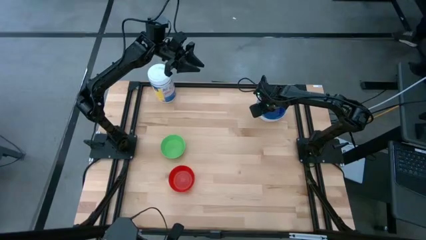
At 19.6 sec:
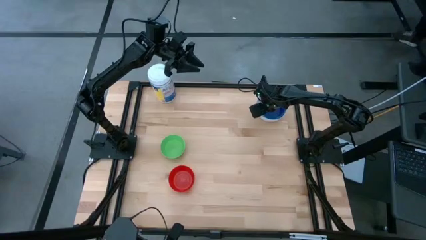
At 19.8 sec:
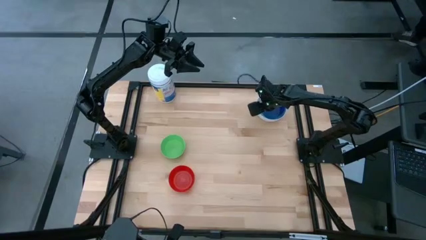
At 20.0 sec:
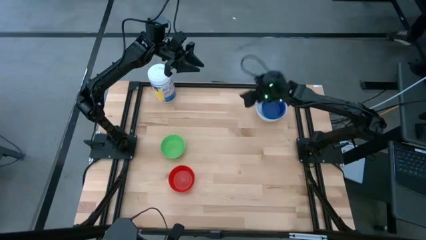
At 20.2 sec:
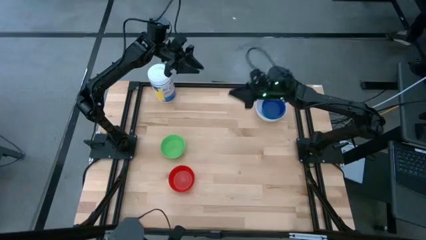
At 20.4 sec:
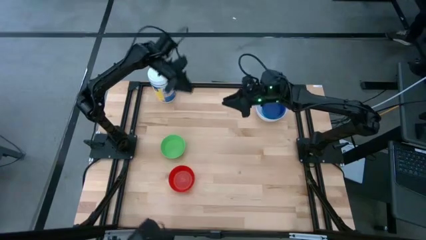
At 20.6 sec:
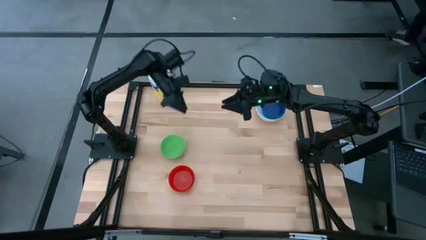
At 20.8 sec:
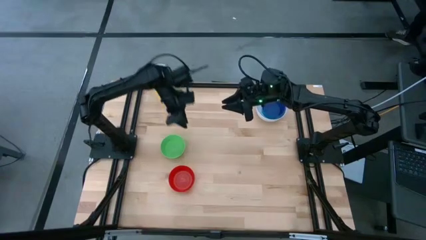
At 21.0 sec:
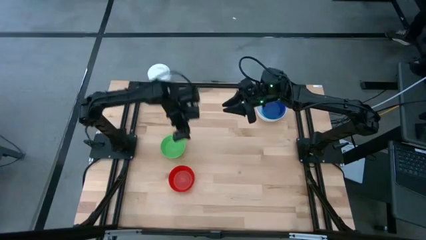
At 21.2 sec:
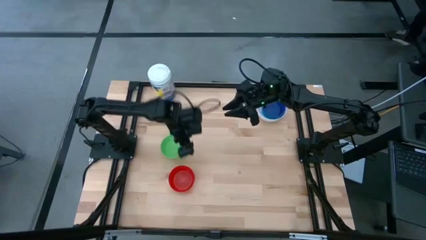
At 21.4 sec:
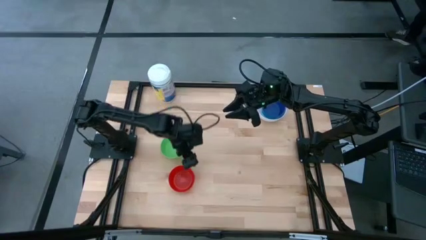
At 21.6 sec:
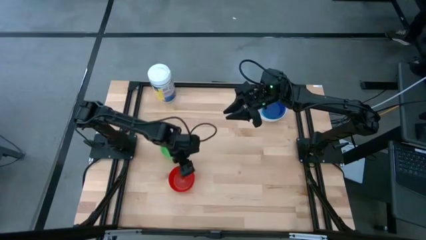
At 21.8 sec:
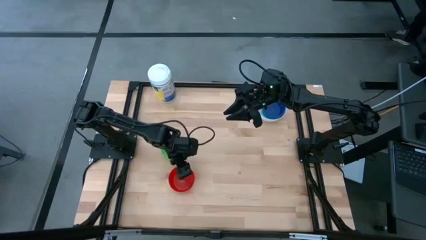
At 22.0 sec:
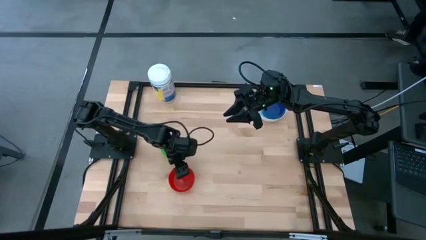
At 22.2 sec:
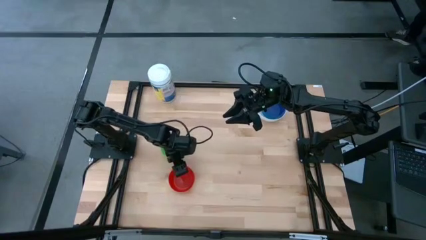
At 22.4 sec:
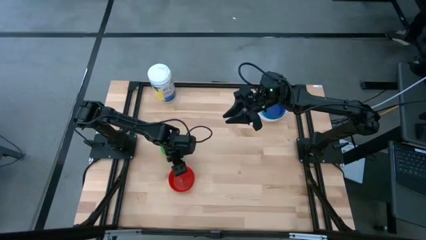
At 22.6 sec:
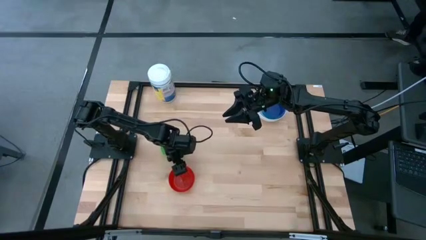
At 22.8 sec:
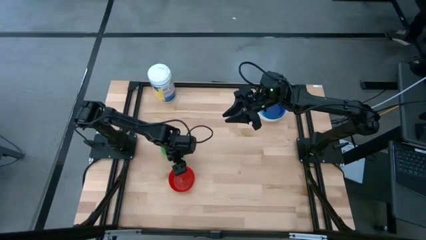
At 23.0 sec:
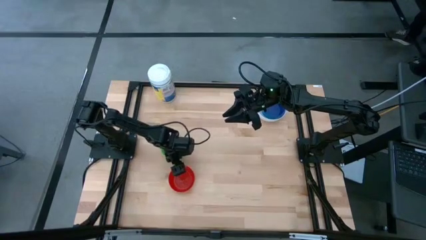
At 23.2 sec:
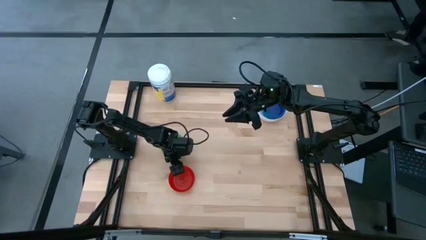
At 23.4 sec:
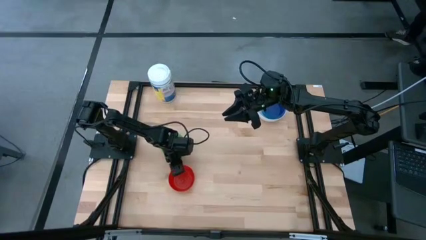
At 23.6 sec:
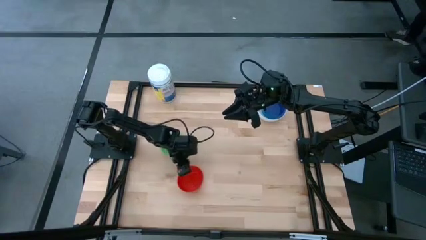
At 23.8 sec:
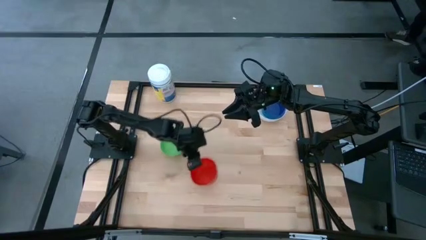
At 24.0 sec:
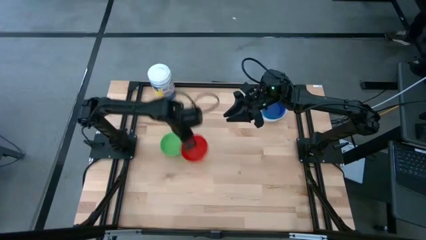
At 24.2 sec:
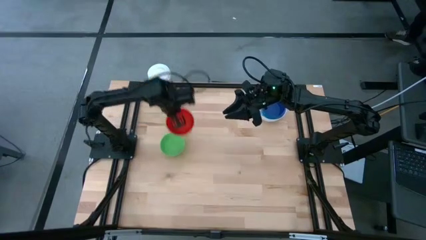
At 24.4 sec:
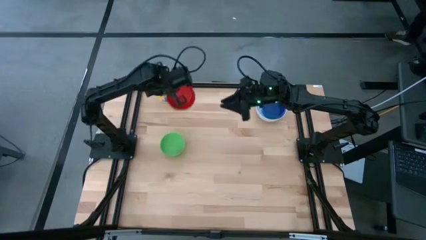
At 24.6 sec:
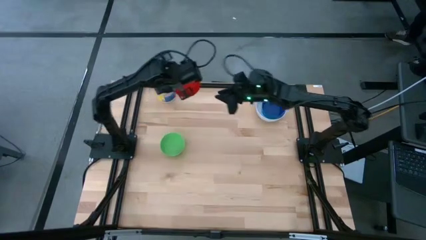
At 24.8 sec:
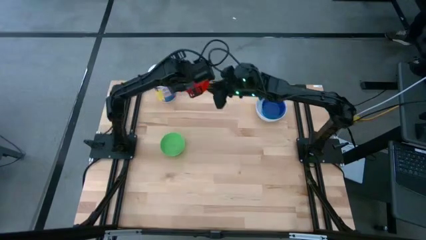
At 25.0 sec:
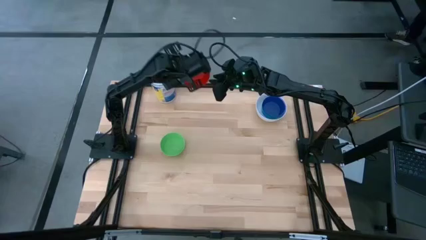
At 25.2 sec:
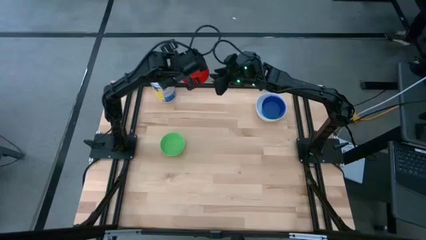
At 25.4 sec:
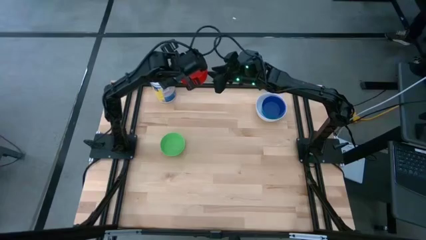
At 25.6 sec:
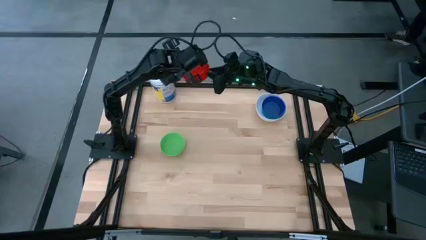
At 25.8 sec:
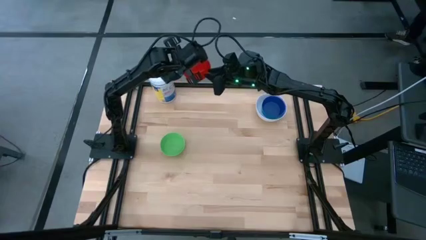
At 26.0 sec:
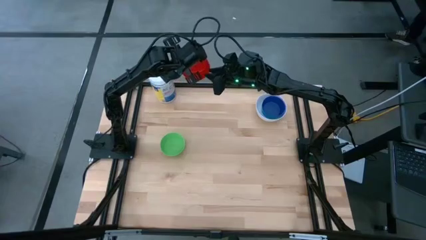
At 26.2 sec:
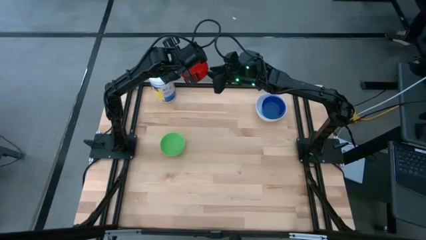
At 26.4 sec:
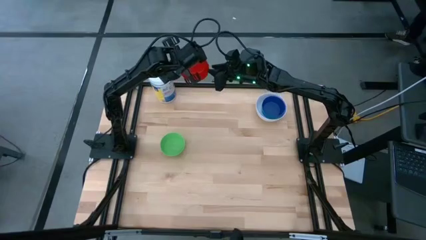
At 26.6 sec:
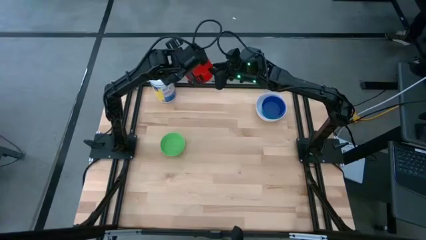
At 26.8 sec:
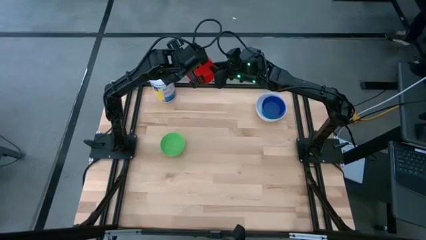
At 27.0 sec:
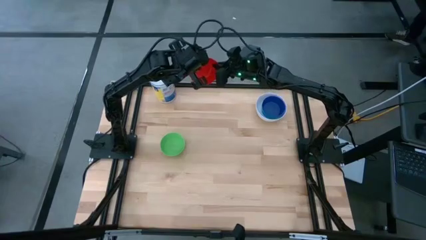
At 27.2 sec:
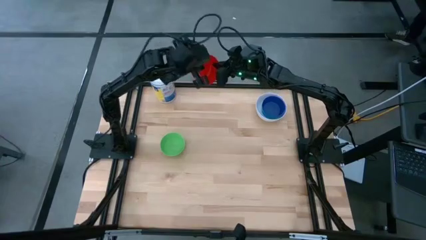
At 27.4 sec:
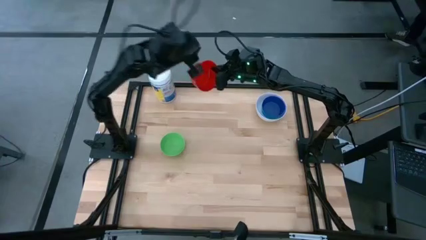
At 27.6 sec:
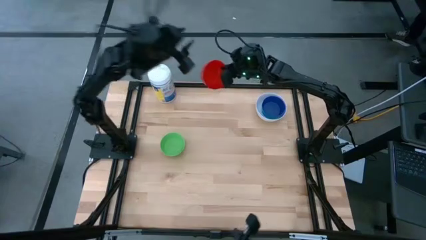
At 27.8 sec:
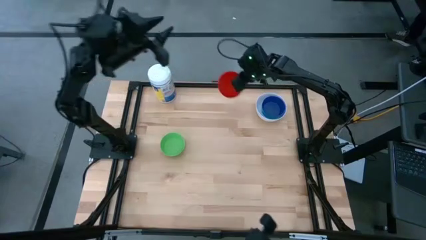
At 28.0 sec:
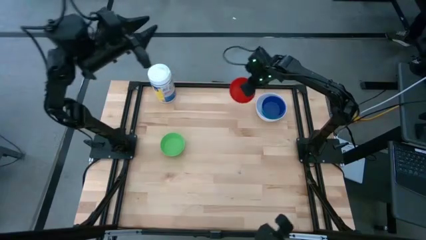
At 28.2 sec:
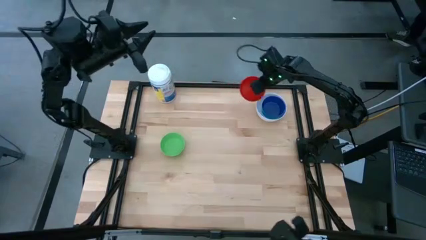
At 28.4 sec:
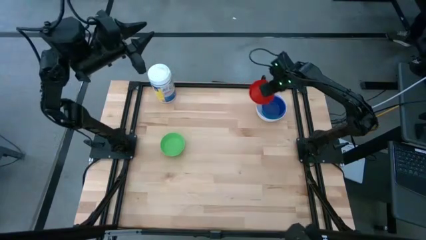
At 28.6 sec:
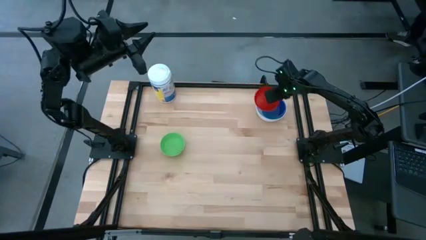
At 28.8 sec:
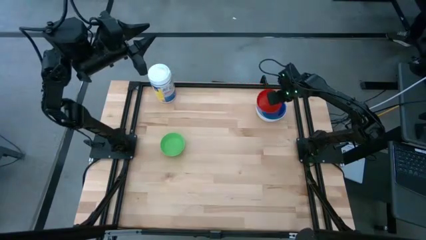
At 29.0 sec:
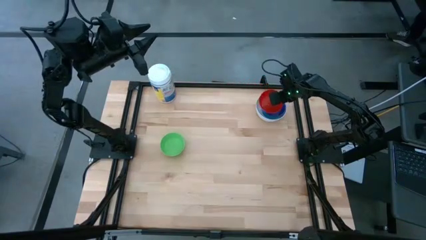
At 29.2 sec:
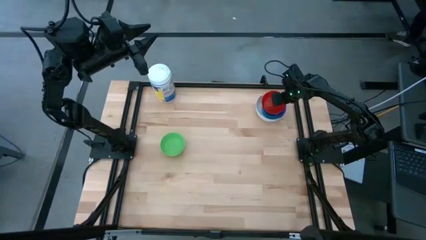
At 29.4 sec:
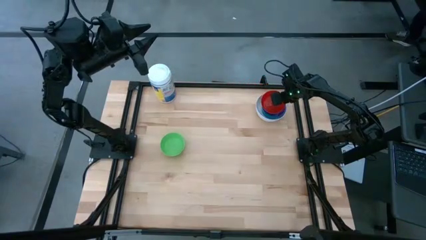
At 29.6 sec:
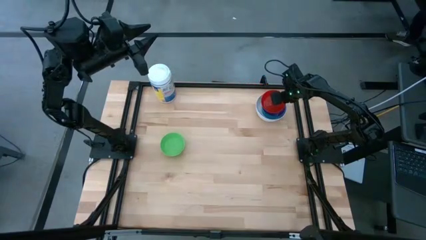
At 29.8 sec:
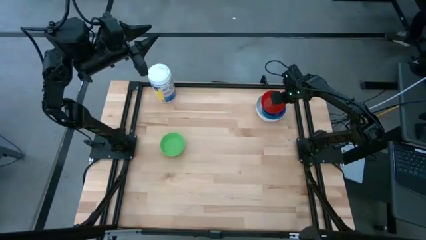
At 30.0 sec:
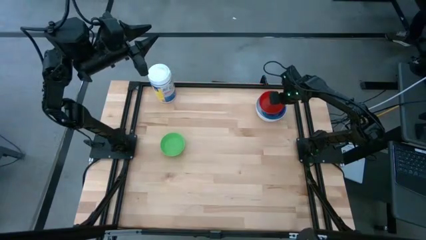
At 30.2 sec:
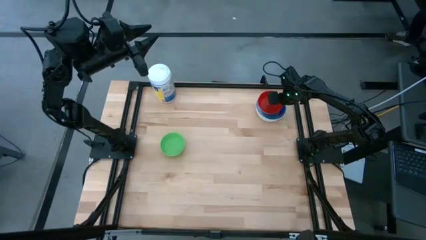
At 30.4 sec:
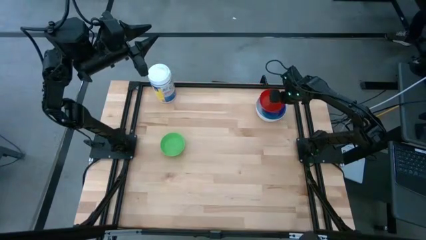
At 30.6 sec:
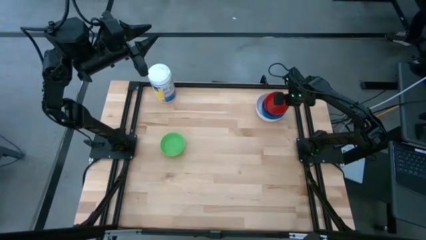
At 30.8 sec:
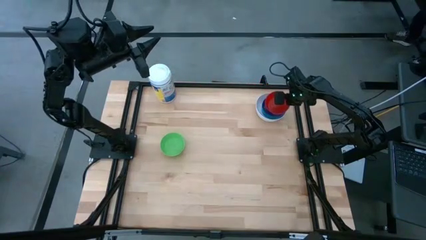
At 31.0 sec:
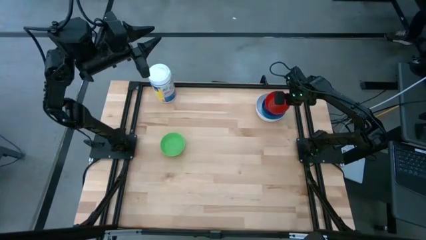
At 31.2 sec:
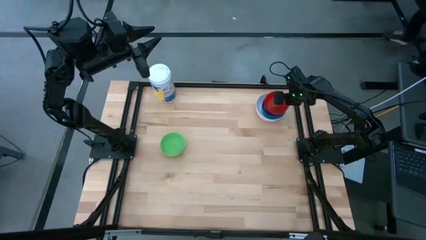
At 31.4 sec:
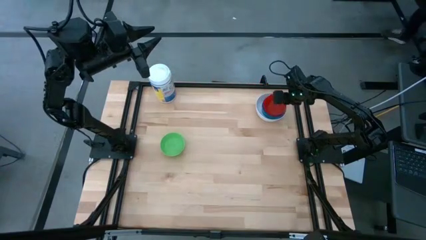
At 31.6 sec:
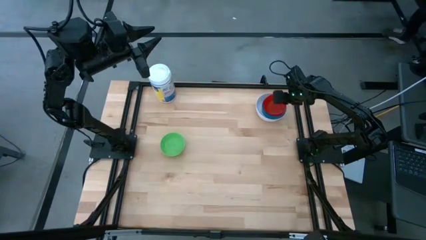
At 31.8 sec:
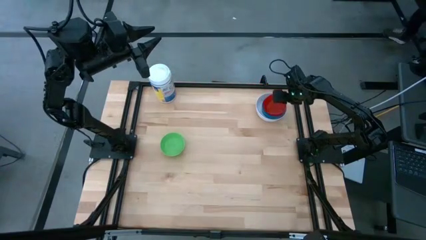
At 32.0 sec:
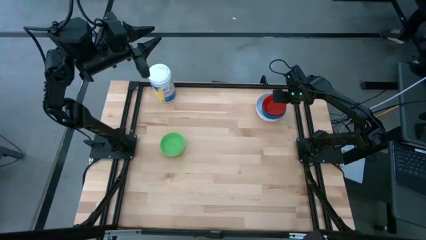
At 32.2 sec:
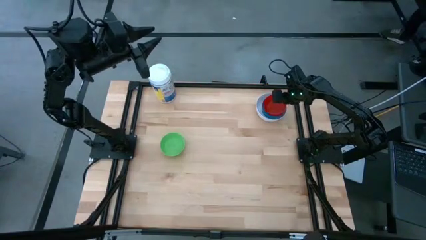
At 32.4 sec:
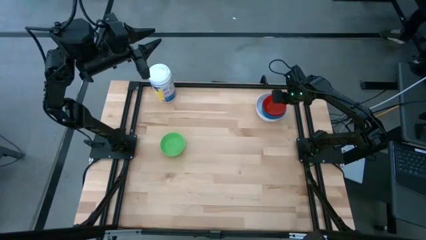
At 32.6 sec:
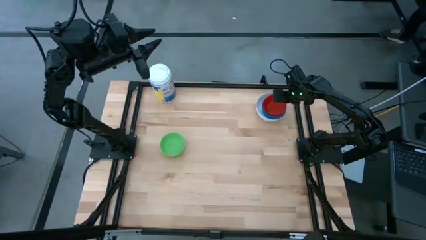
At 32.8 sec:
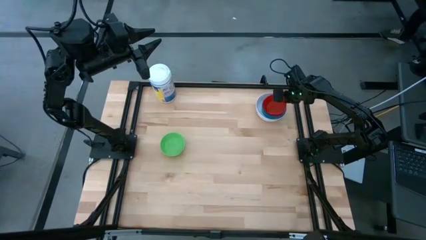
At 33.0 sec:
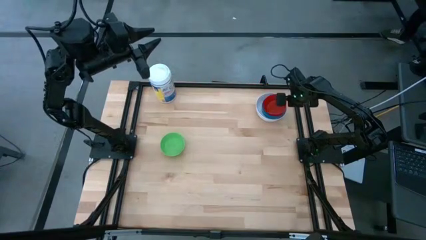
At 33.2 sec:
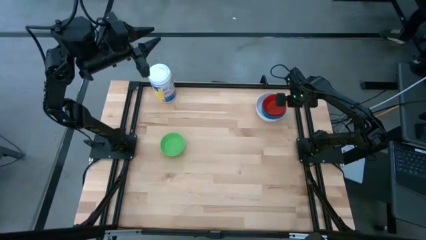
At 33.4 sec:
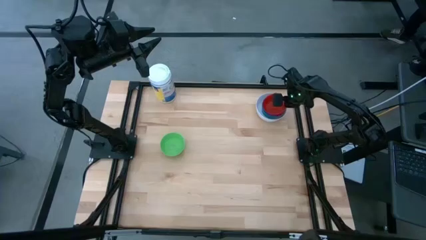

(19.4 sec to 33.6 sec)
Stack the red bowl on the blue bowl

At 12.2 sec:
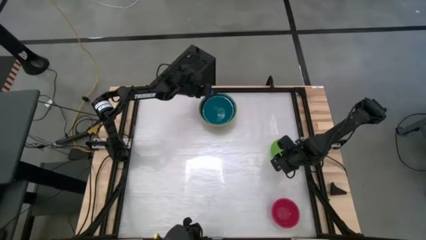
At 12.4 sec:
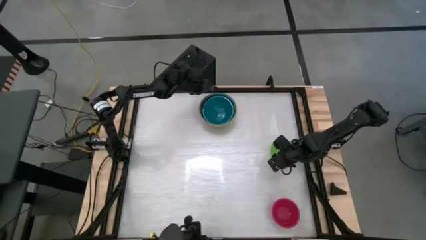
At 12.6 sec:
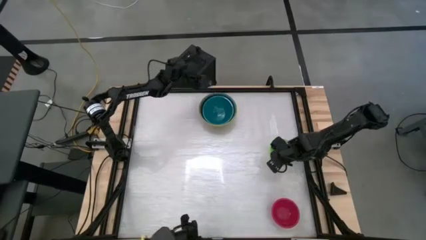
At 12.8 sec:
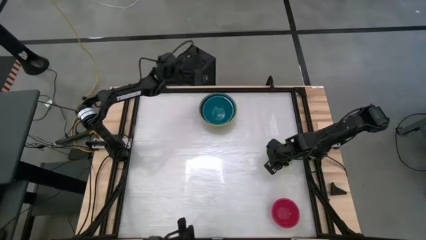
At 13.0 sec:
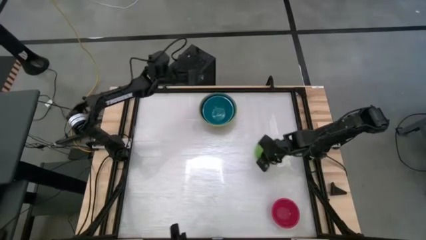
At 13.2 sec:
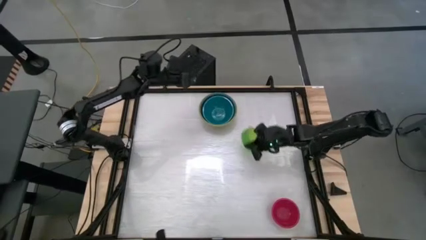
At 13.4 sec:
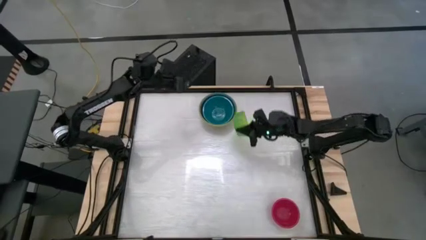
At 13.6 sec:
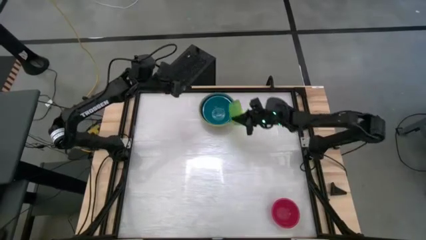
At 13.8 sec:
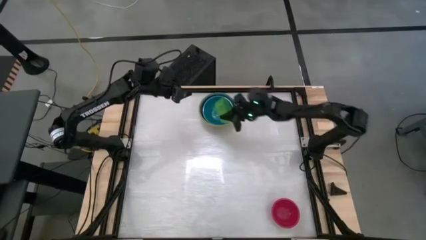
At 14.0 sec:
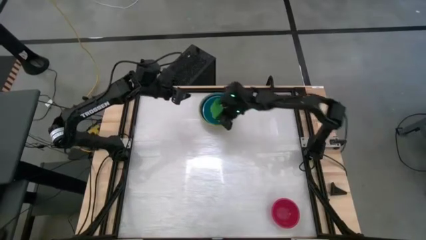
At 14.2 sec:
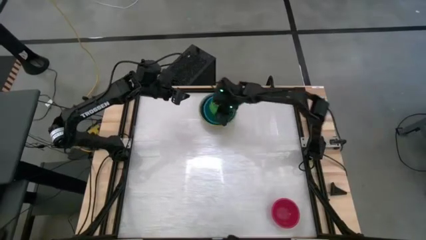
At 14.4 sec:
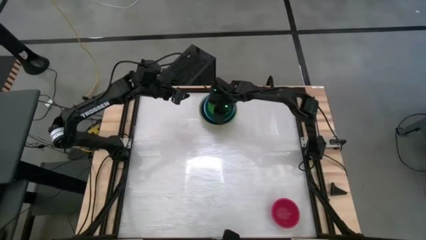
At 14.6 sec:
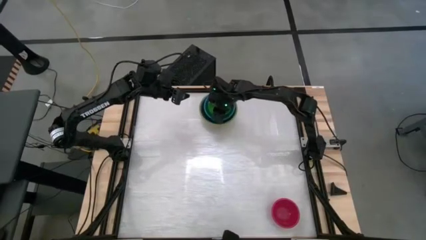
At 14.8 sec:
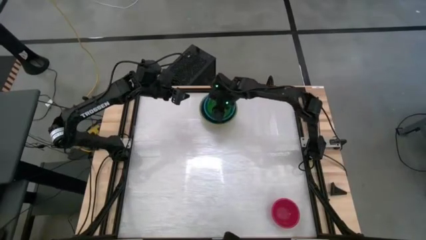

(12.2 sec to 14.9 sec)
Stack the light green on top of the dark blue bowl
